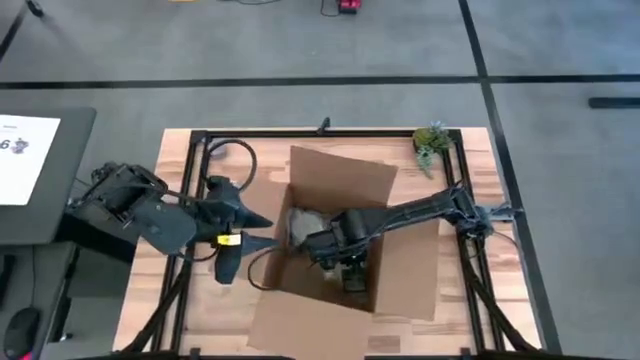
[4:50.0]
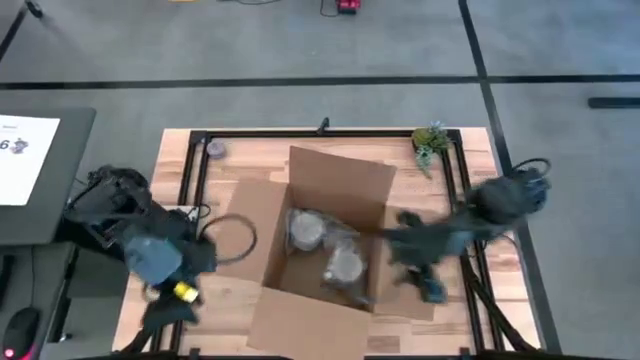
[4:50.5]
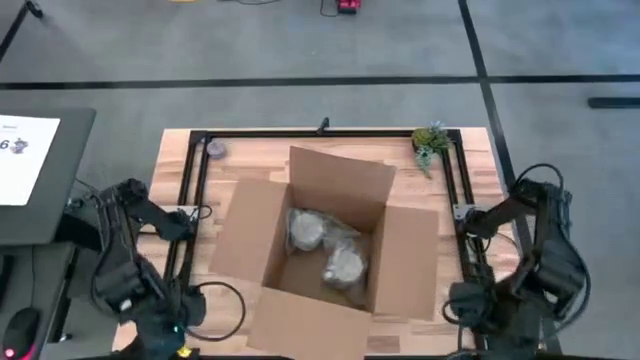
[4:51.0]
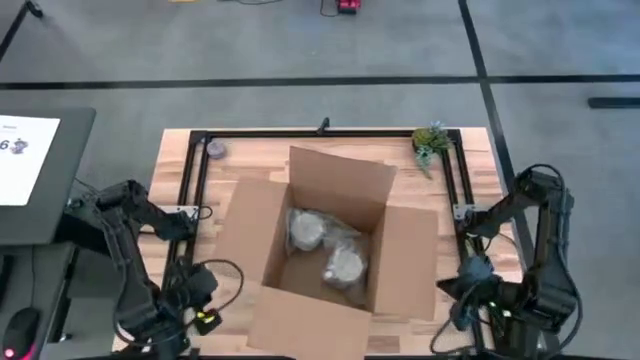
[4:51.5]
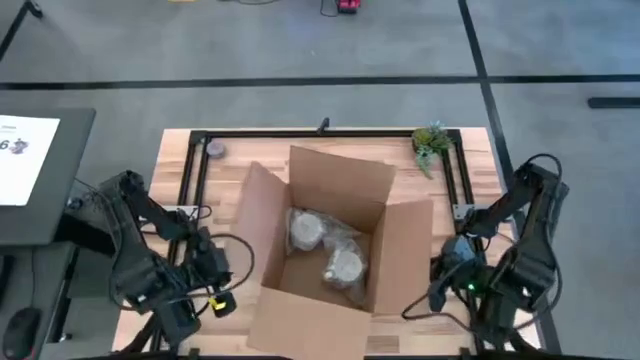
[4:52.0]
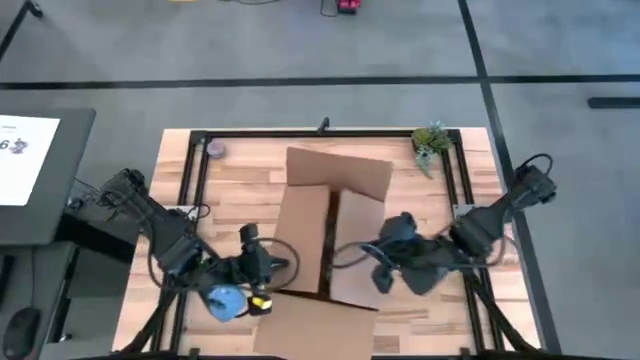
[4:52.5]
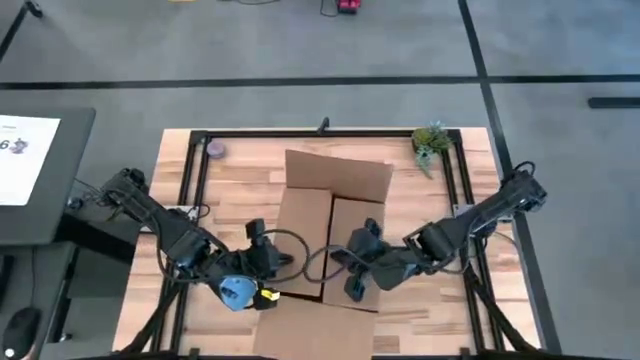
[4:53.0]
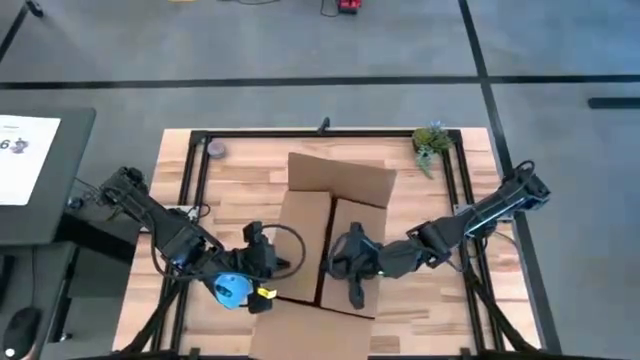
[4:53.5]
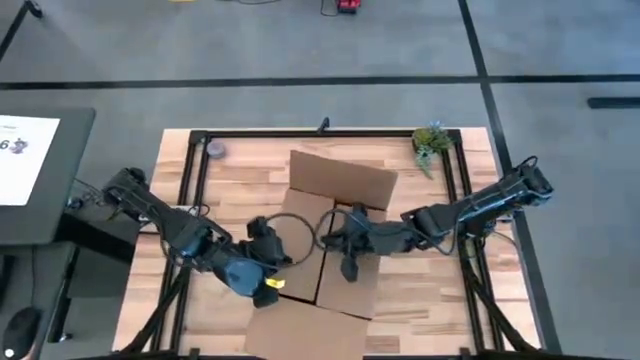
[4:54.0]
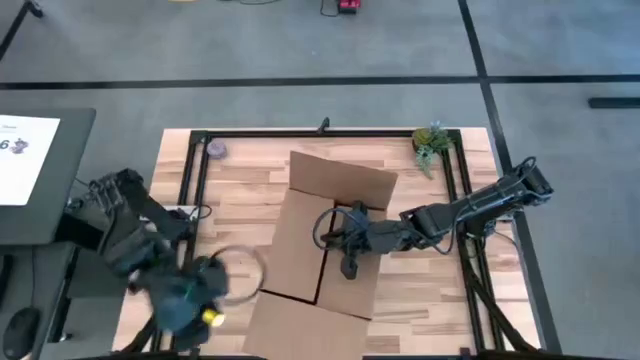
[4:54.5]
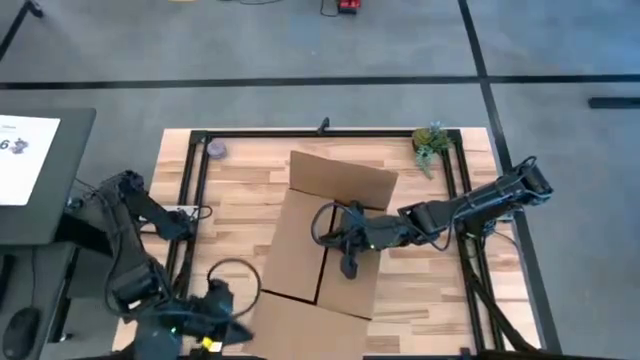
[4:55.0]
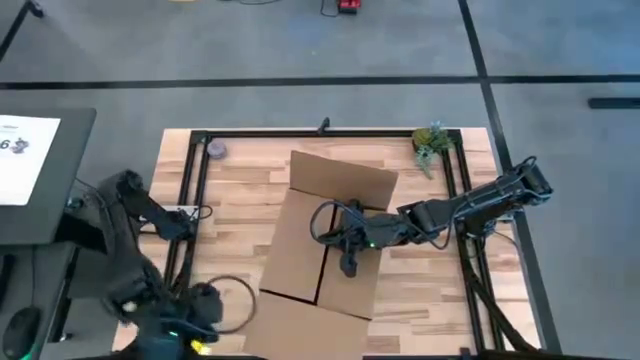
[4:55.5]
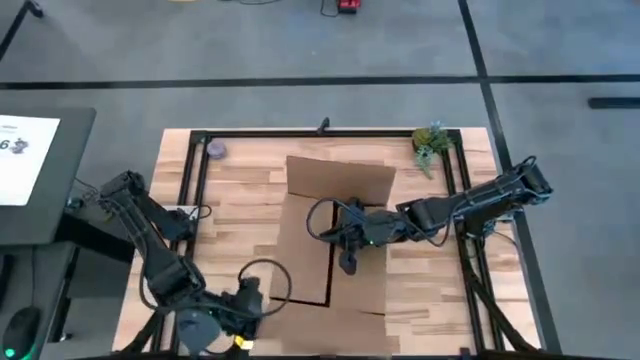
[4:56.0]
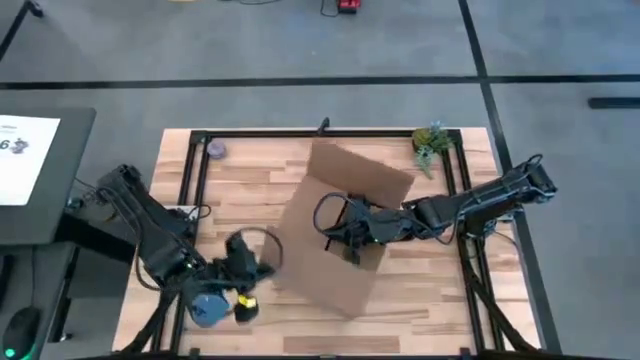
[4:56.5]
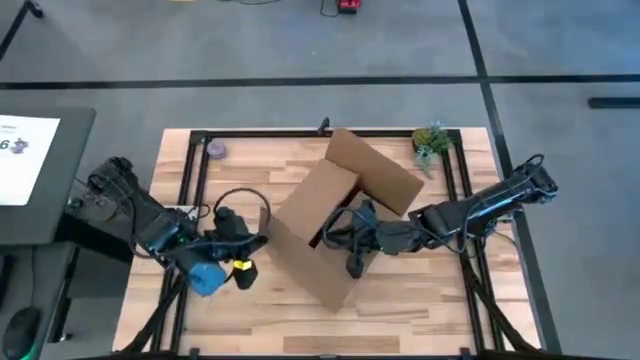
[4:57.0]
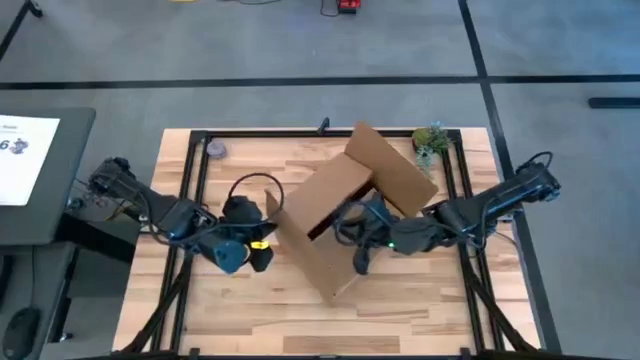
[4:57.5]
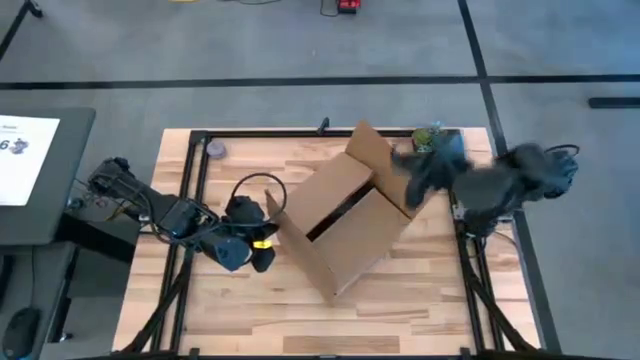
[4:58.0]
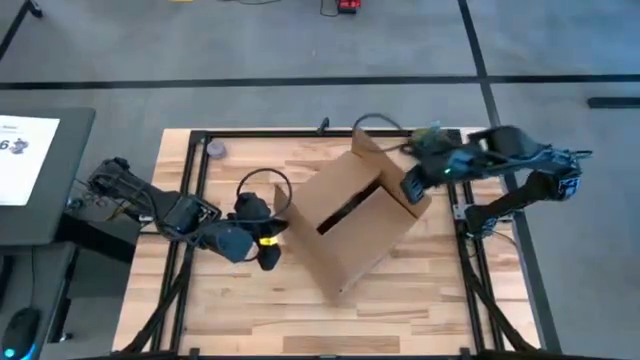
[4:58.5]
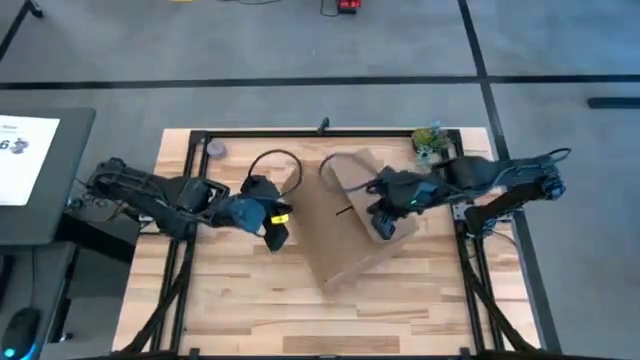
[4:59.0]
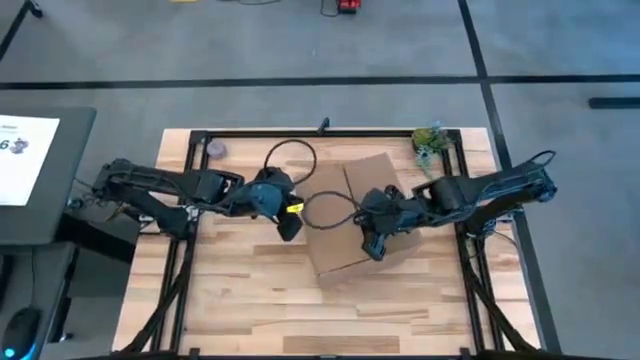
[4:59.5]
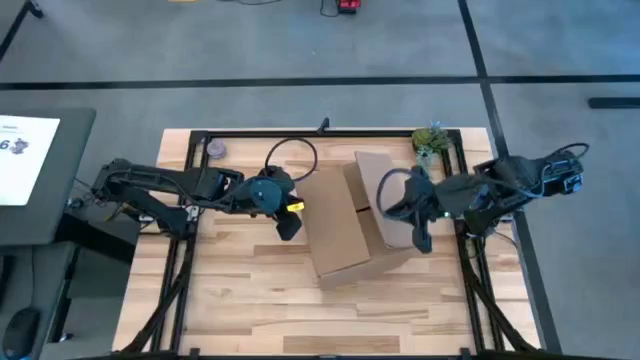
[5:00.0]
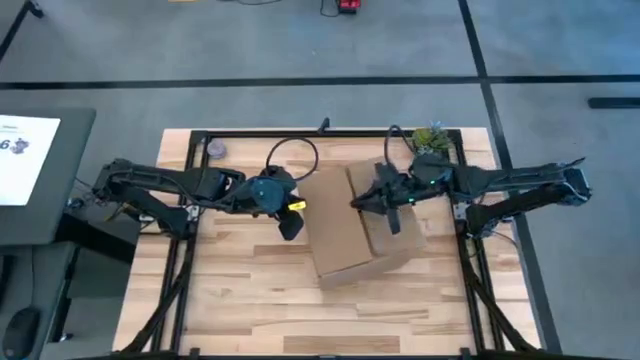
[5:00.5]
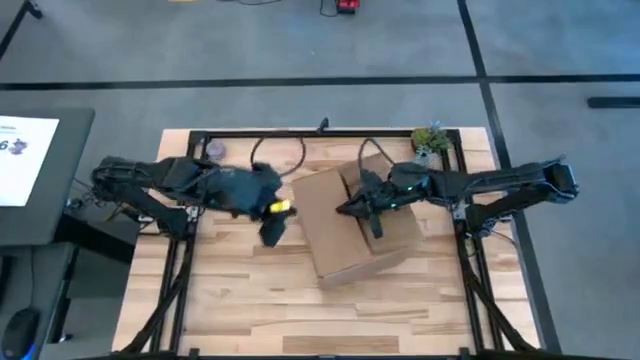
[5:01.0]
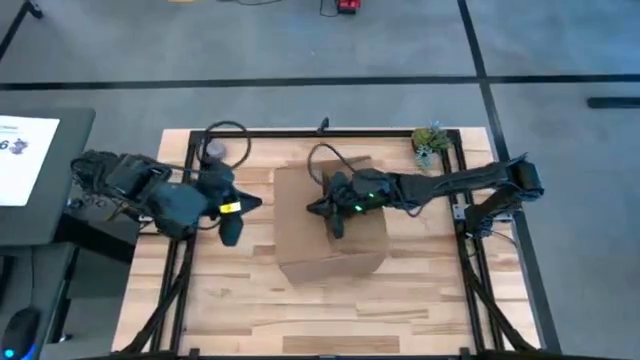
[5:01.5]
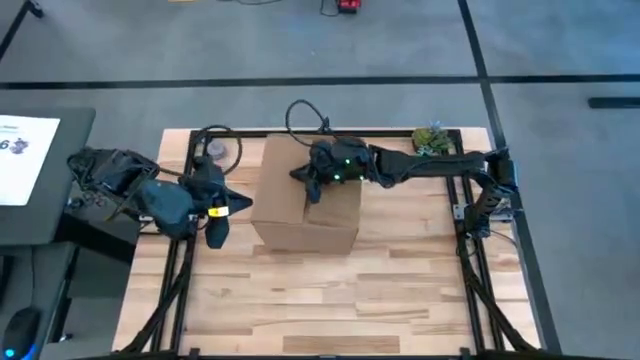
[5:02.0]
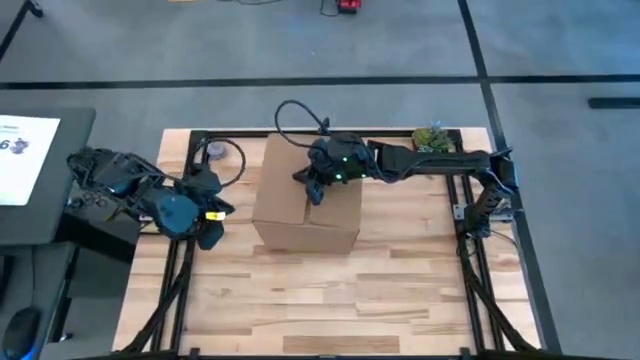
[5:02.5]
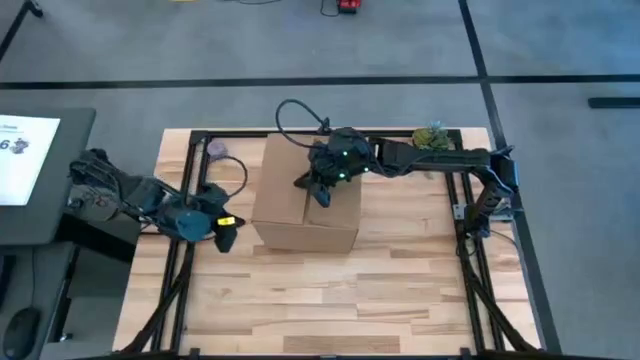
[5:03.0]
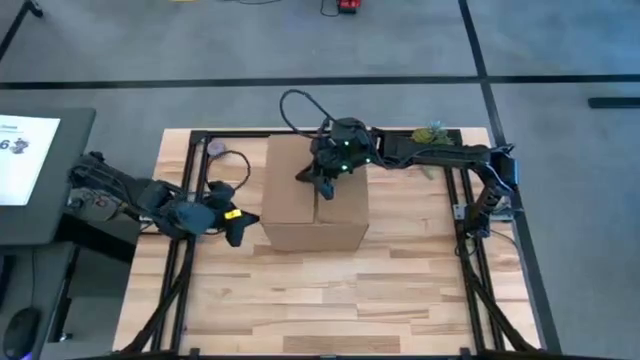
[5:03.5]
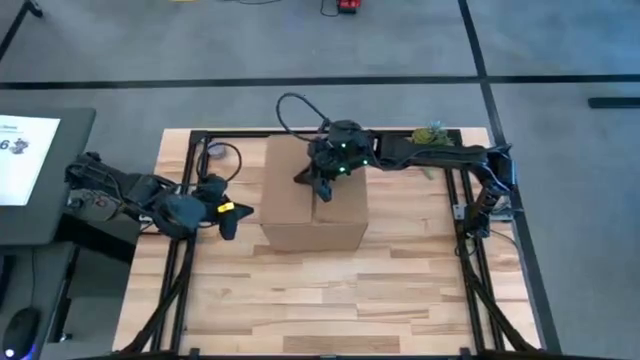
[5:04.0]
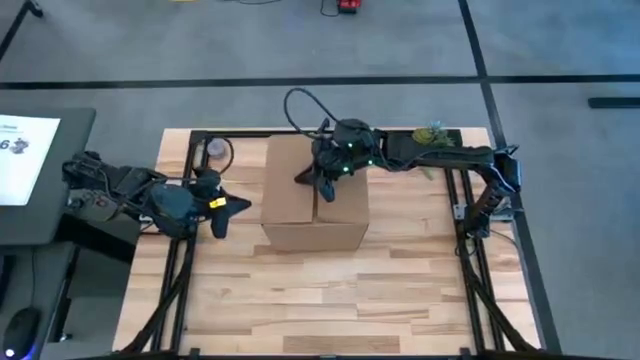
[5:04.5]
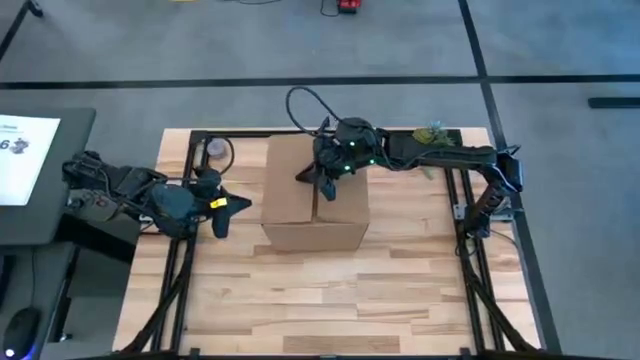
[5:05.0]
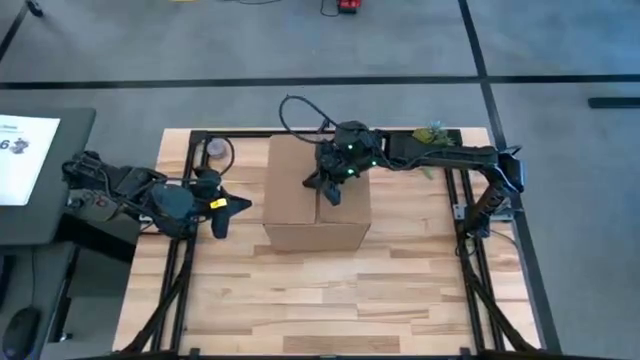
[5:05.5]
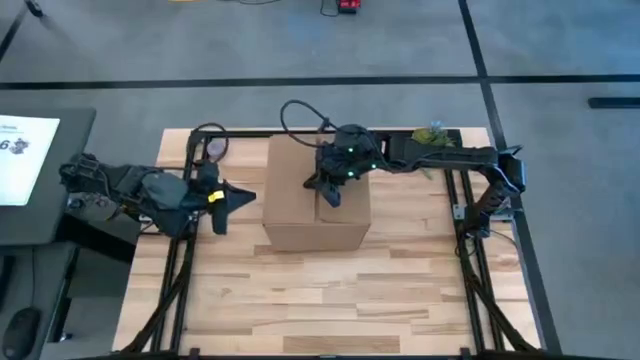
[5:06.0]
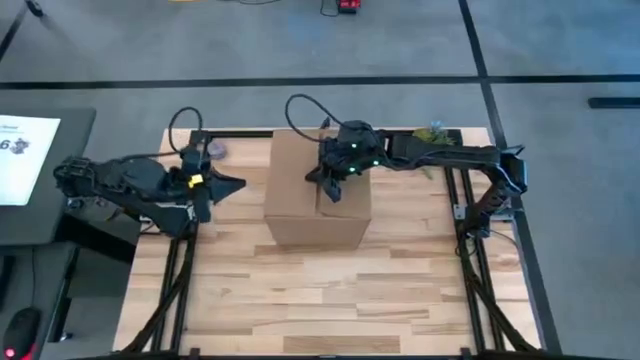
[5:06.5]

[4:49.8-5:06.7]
Task: wrap mug
Close the box

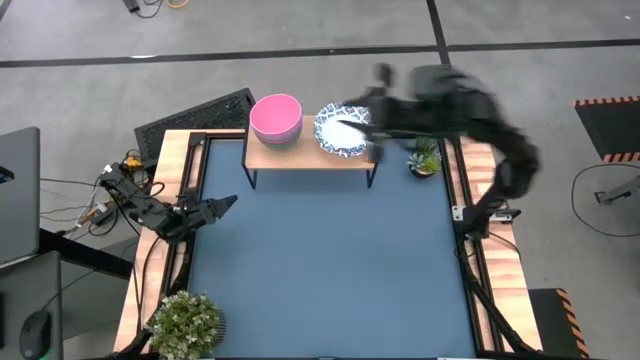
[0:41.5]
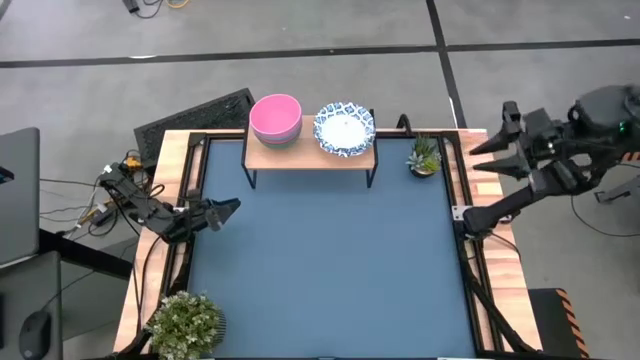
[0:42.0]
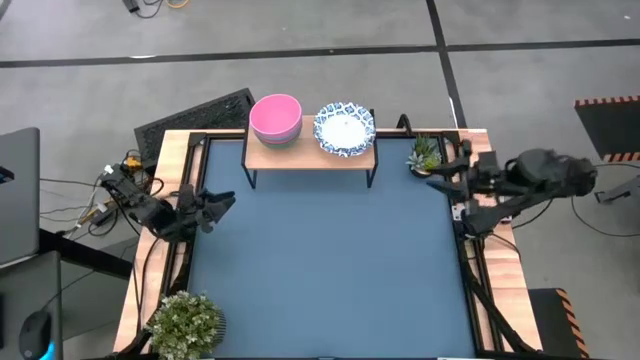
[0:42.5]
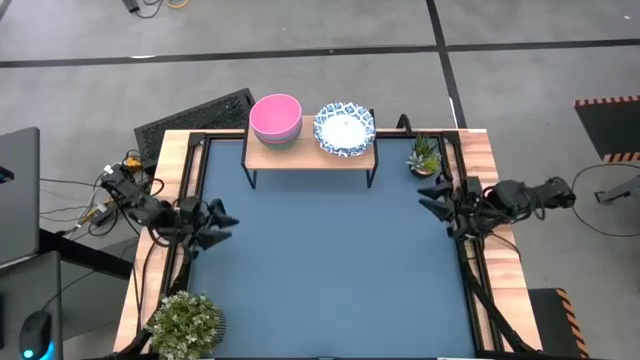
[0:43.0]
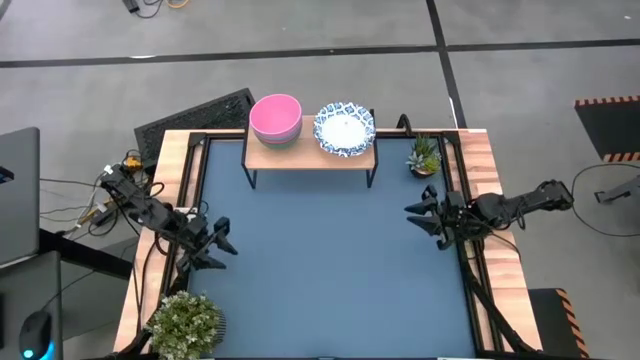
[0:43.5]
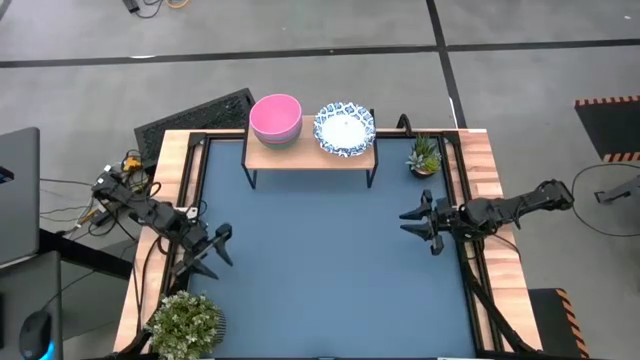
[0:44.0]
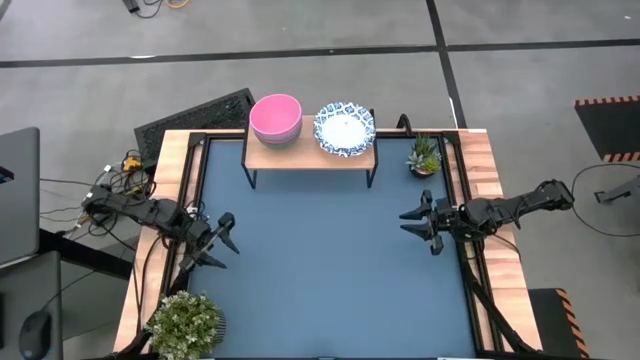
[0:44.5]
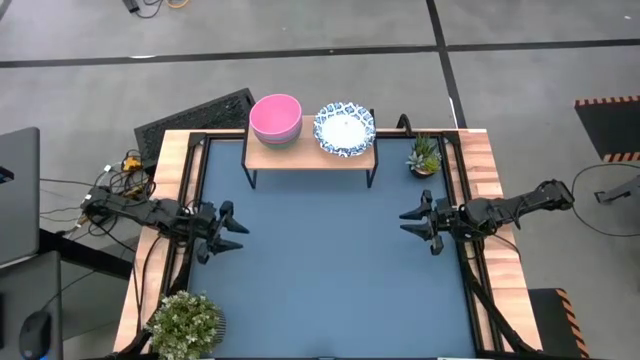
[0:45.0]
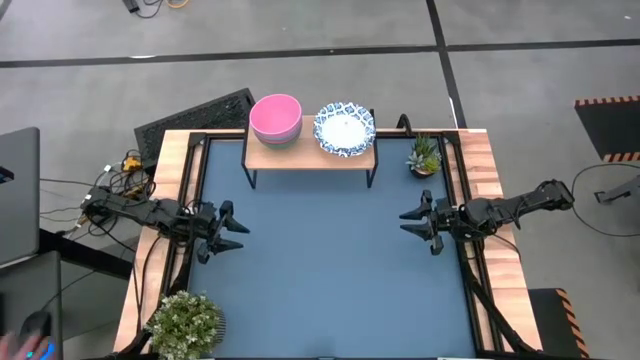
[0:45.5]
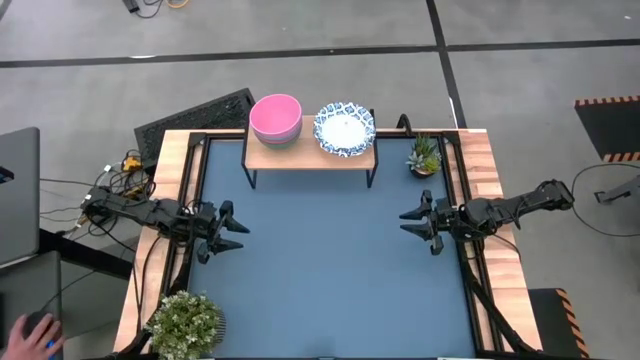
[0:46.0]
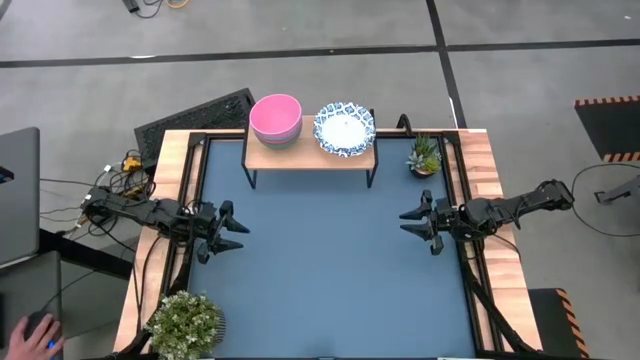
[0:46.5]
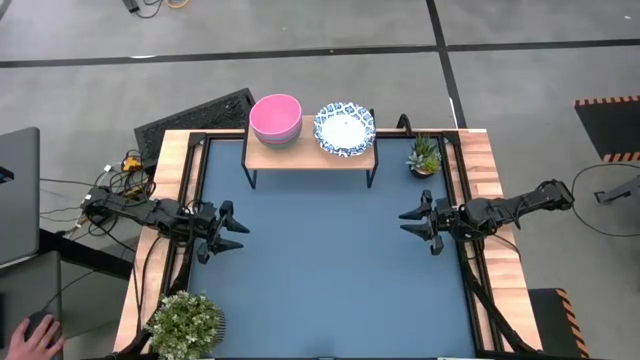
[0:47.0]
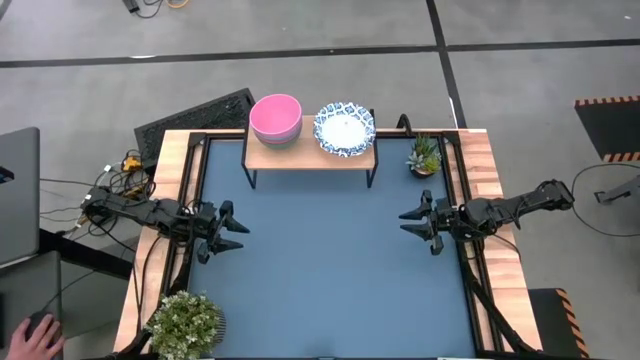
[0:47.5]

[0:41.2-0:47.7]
Task: Place and stack bowls onto a shelf
Return to Home Position
